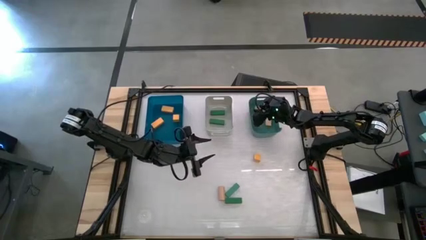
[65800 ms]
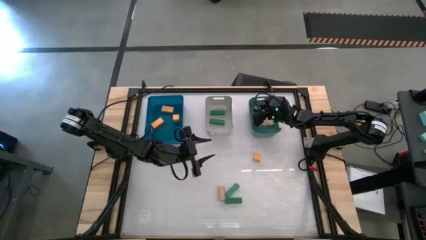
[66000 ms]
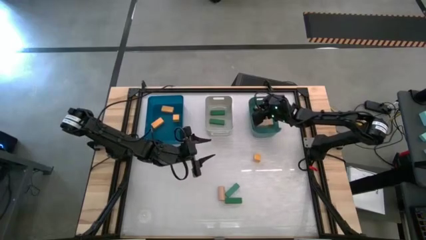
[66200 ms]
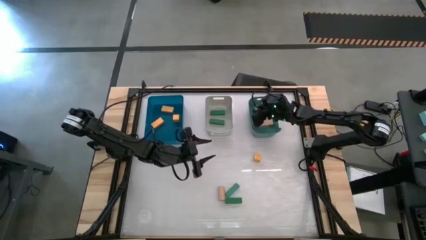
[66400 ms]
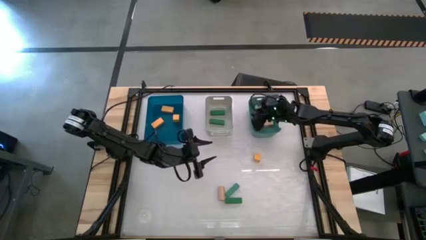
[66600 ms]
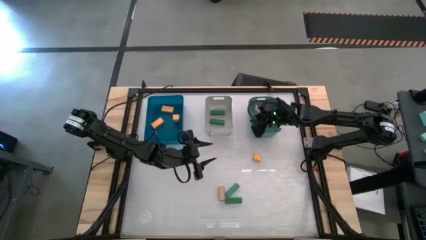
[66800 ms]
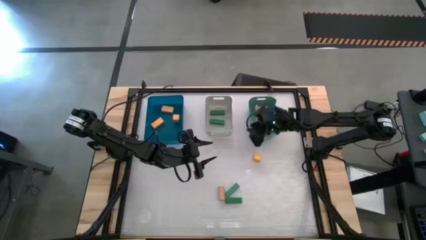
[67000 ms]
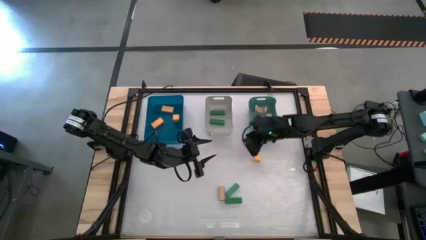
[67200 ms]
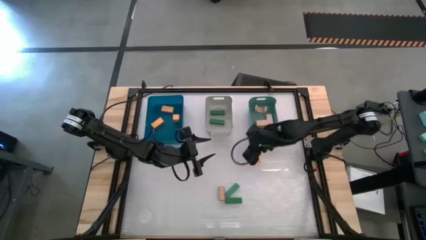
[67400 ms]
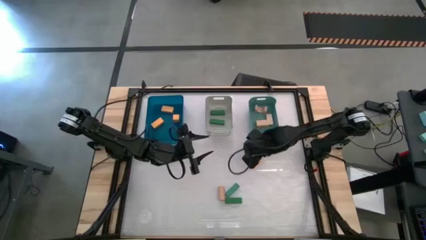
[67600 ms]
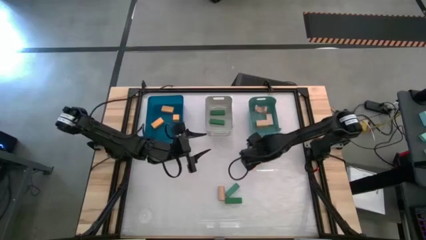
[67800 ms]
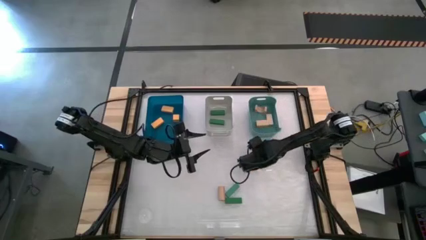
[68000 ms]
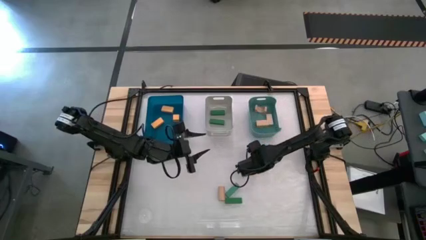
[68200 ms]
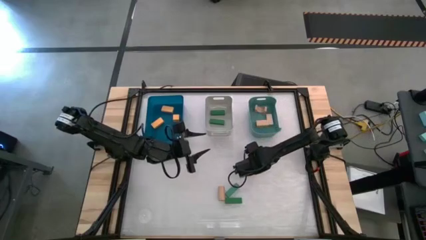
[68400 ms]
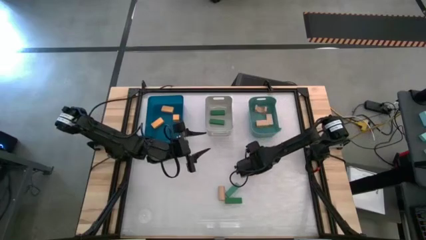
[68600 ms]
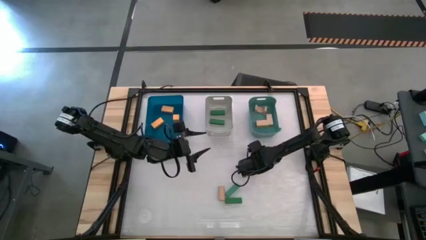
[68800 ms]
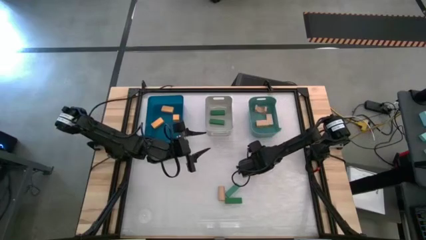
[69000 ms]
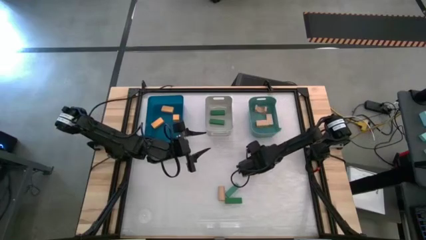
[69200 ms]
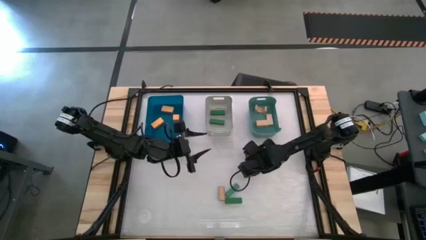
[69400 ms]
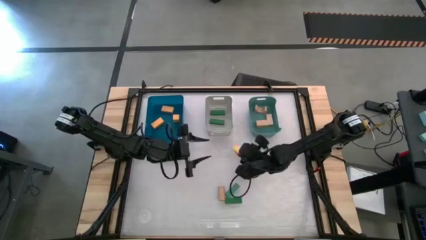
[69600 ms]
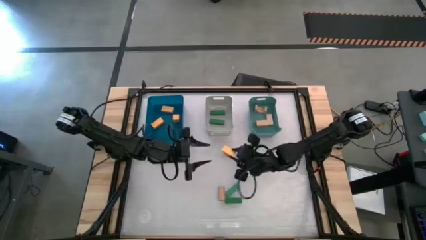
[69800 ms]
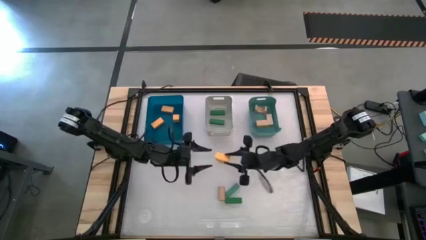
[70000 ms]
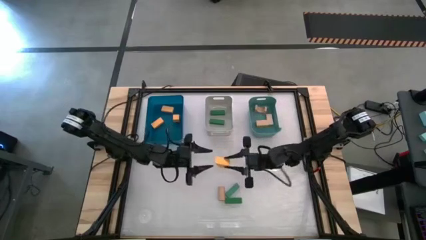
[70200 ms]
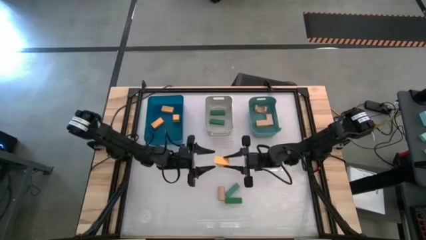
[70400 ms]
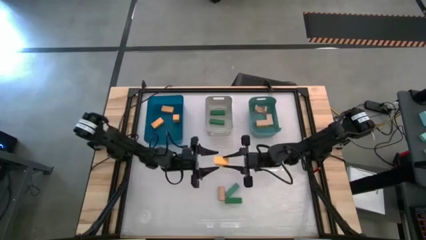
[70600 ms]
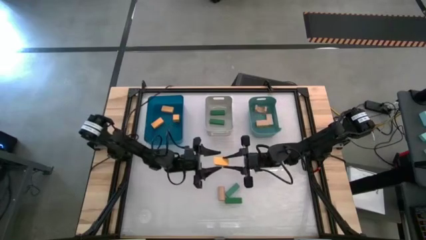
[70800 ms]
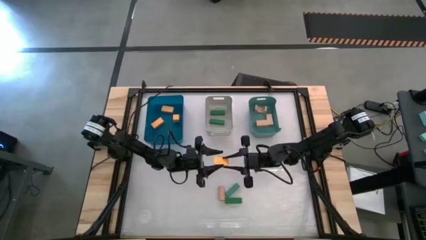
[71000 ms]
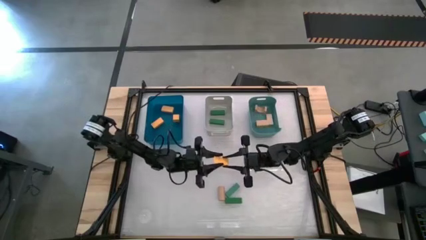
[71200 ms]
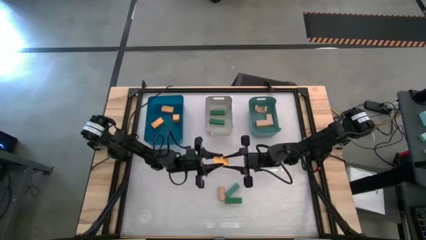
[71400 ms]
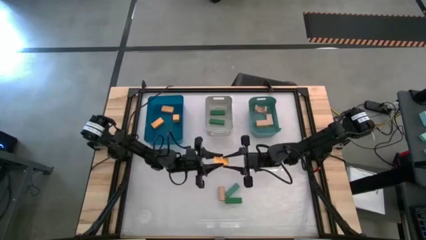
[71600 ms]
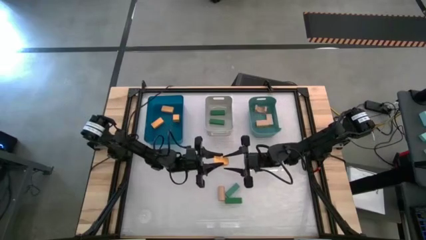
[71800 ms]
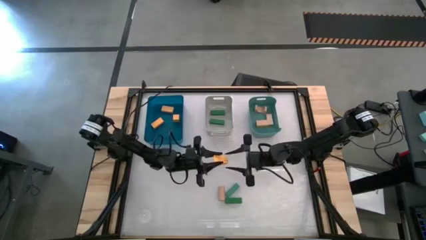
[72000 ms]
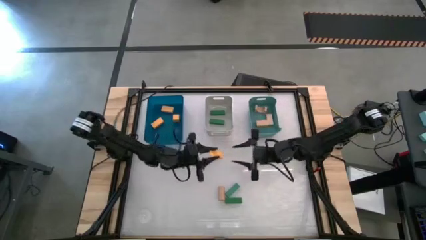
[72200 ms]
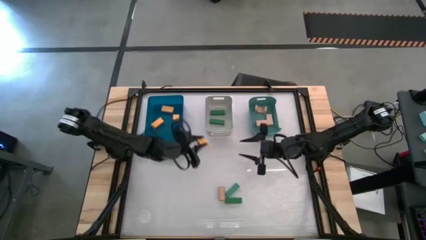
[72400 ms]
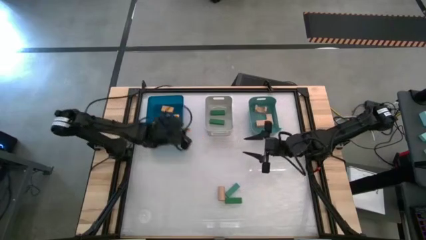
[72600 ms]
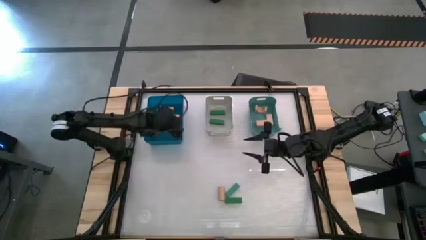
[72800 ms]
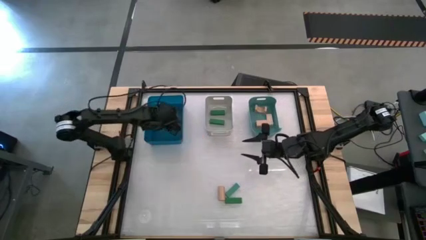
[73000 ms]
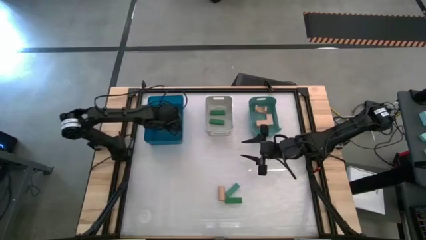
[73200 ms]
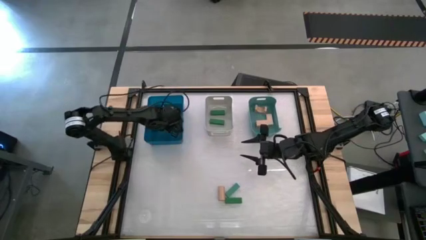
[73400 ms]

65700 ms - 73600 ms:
Task: Sort & place blocks by color
Put the yellow block into the blue bin

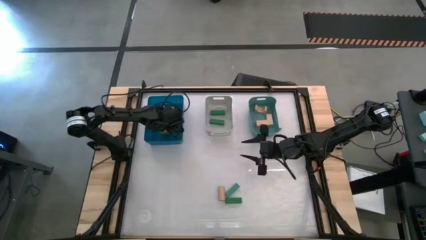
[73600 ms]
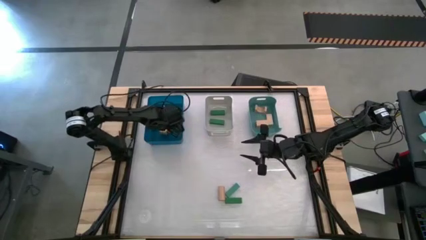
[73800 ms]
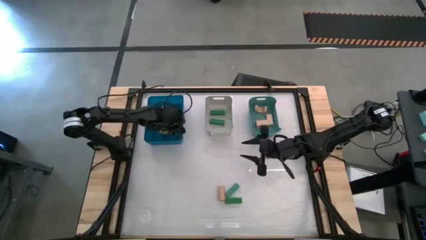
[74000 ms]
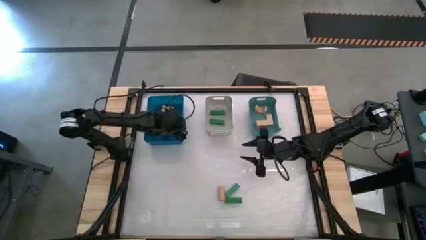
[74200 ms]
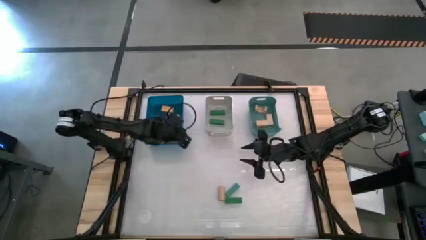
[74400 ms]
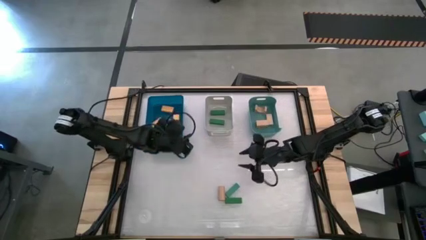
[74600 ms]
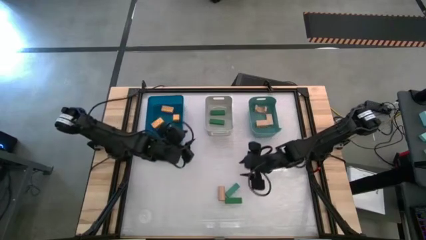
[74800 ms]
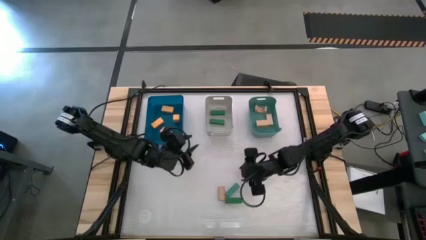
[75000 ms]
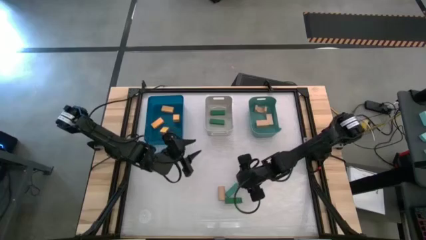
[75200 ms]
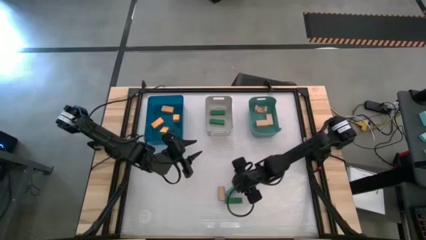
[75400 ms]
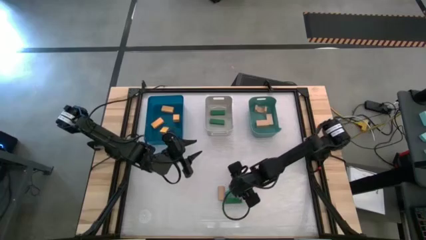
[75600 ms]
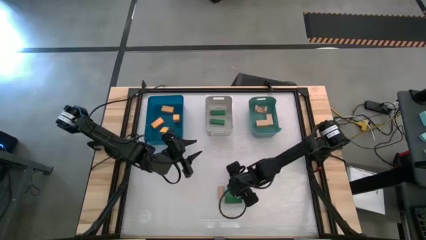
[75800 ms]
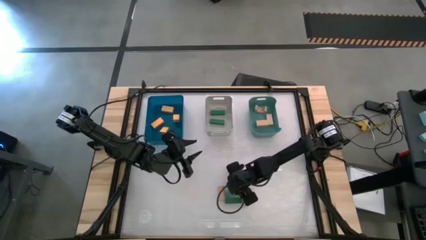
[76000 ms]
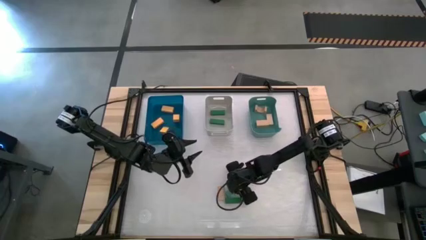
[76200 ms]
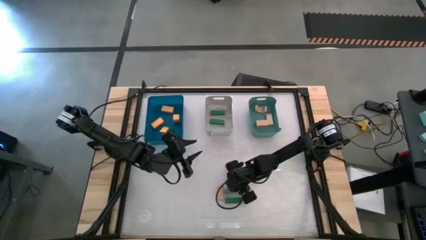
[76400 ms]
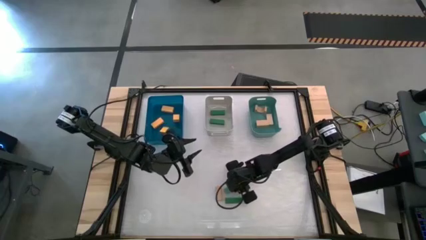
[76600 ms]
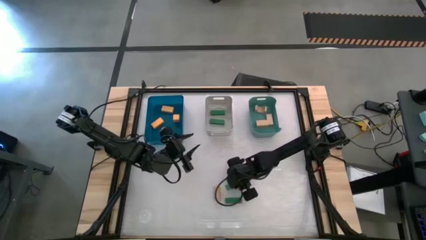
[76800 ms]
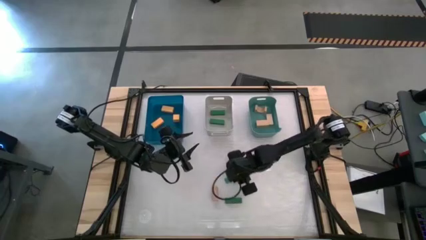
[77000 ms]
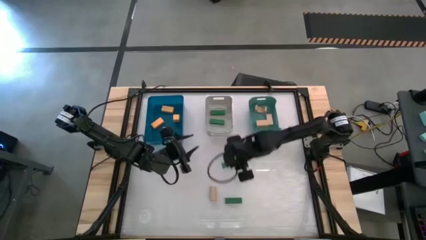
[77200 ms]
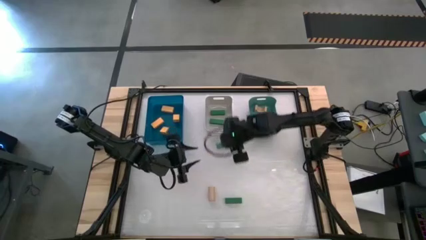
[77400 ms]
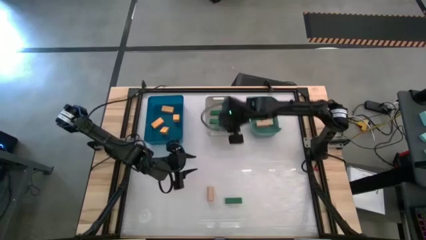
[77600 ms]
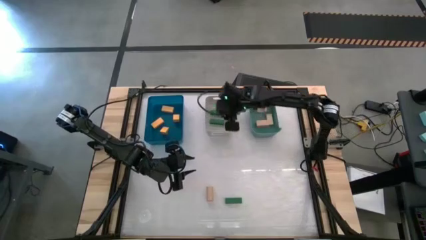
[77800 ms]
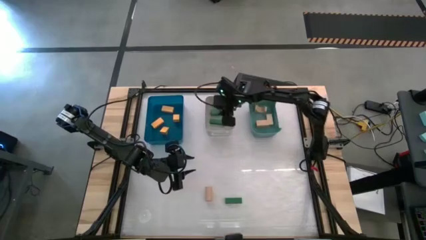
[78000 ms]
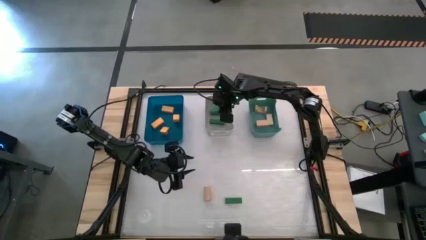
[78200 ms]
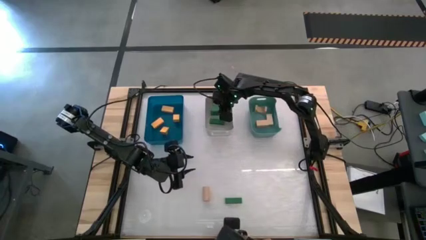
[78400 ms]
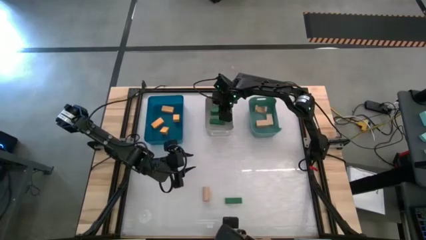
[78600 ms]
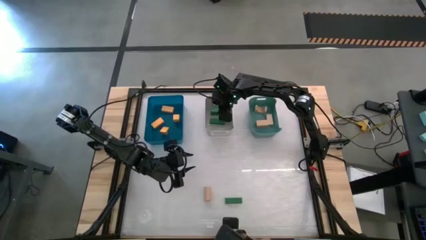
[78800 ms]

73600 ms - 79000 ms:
Put the green block into the gray bin

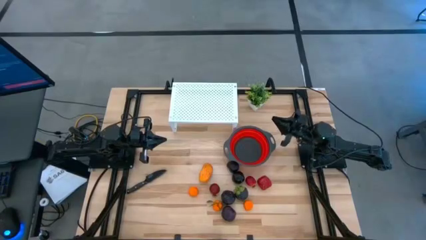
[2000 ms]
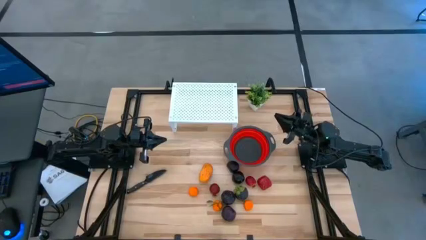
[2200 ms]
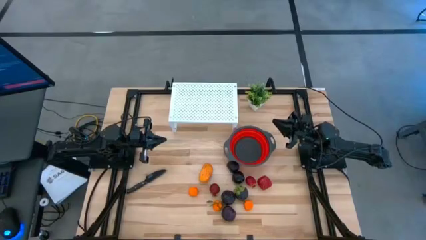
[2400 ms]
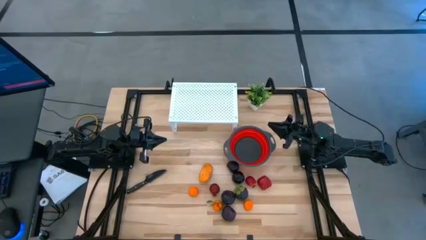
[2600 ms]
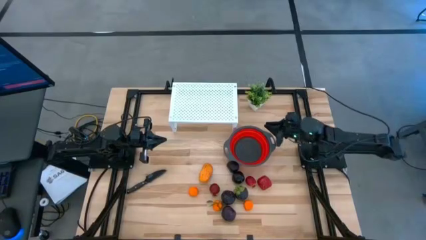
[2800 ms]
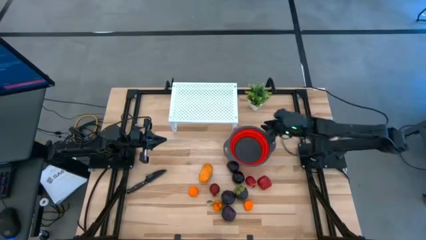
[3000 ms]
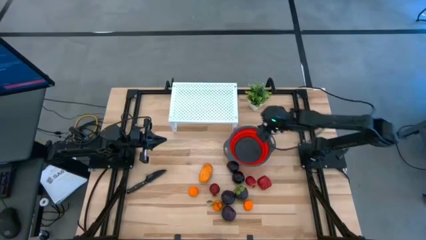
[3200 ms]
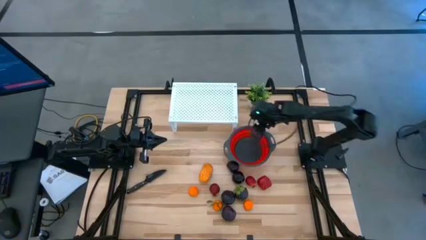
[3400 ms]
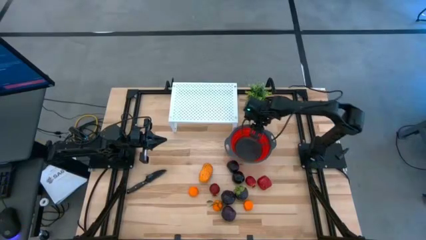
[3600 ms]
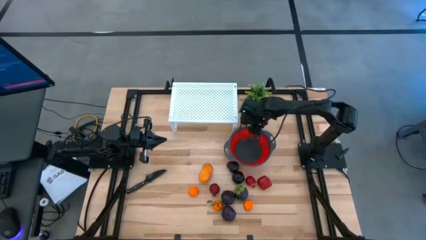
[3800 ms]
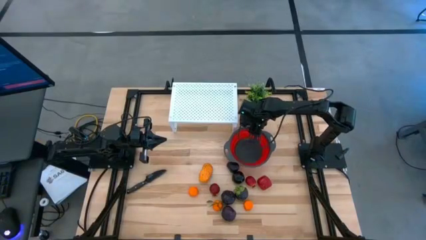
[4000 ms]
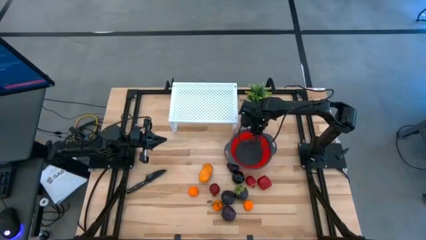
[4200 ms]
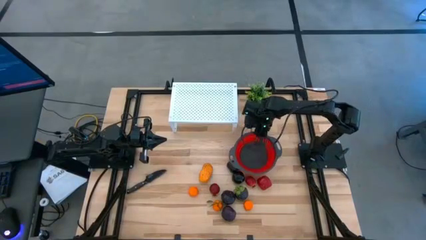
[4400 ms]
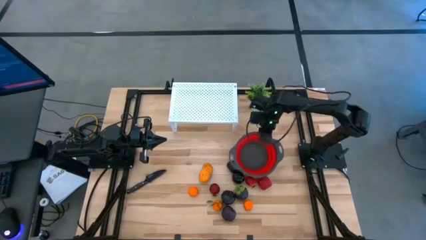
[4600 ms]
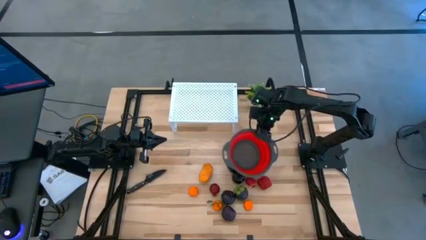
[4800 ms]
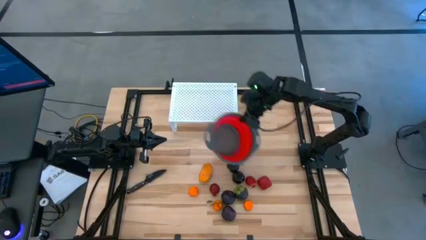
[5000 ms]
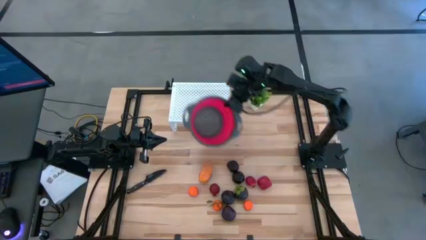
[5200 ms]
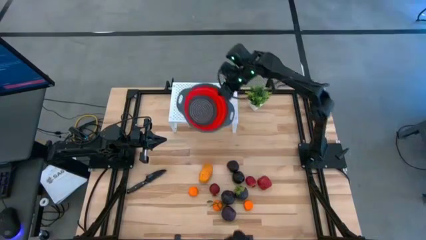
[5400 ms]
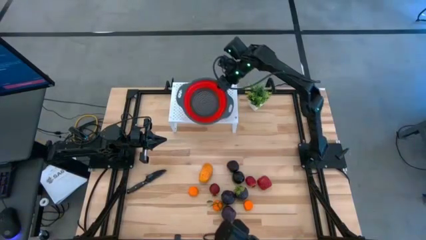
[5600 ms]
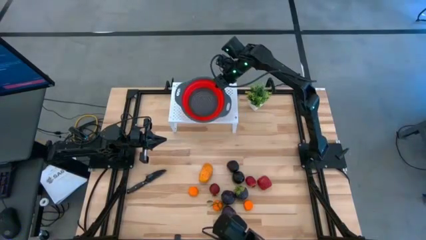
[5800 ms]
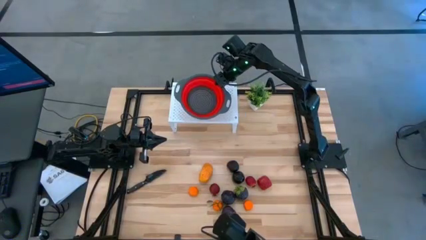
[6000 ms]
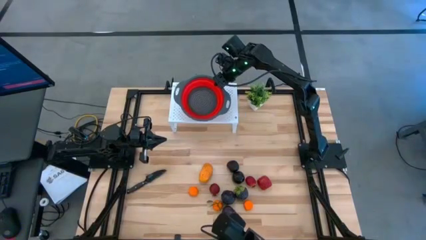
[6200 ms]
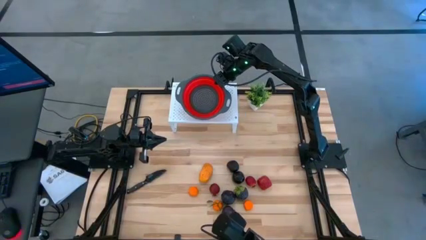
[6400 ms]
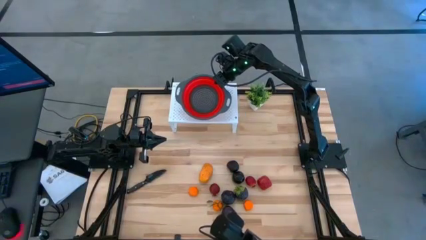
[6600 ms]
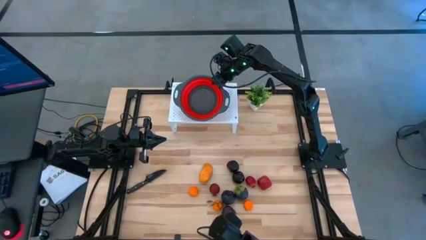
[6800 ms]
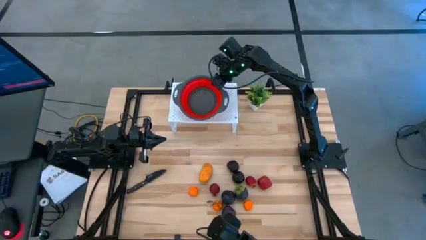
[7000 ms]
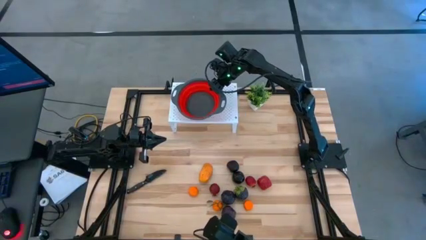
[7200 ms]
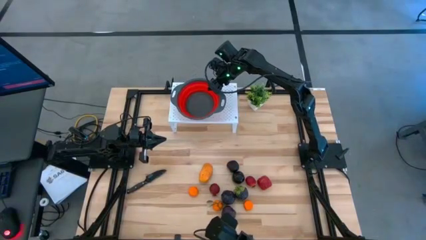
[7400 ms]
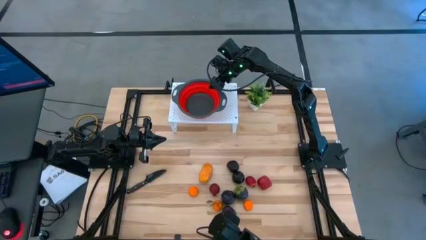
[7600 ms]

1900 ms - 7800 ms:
Task: Pick & Place Fruit
Put the red strainer bowl on the shelf
